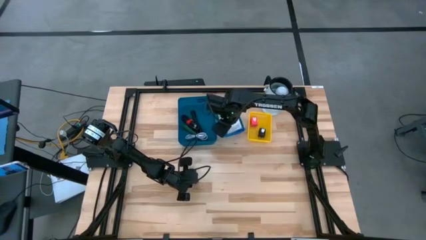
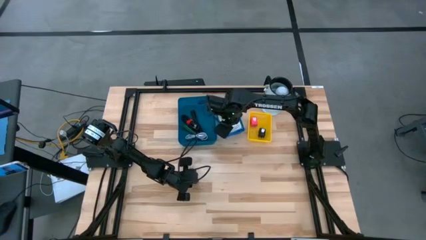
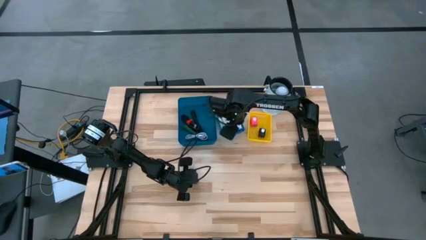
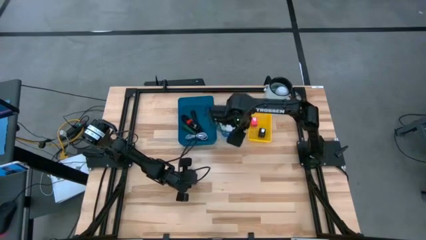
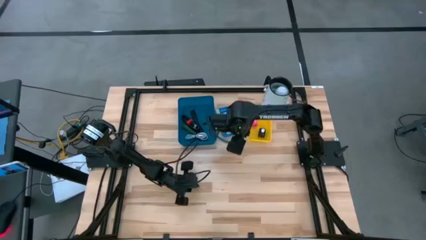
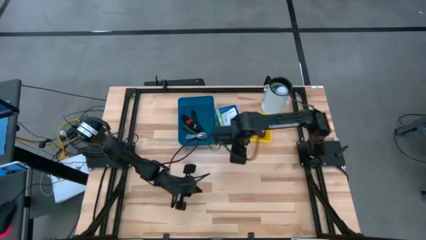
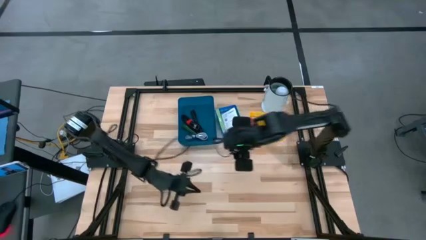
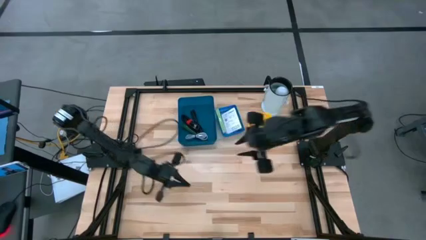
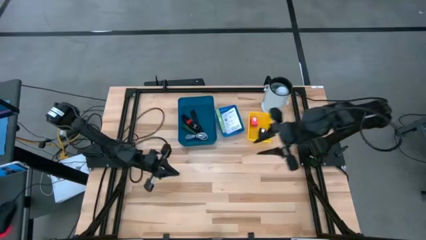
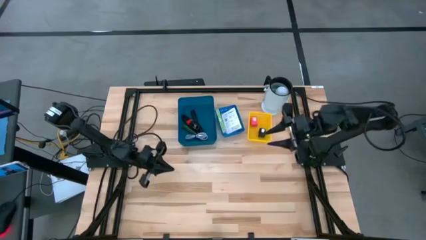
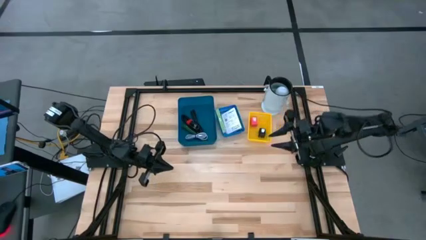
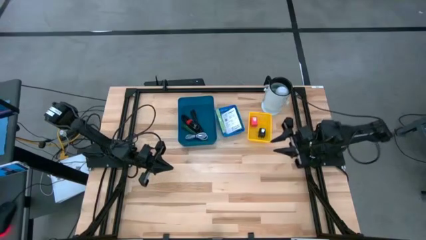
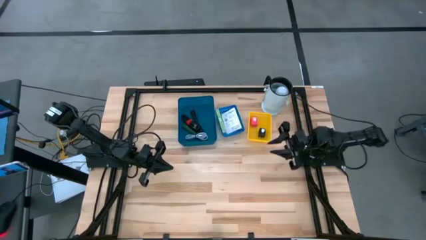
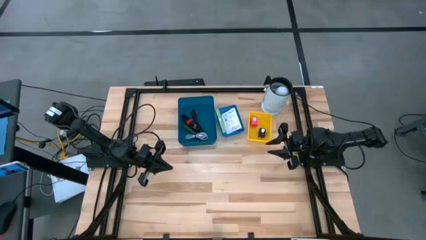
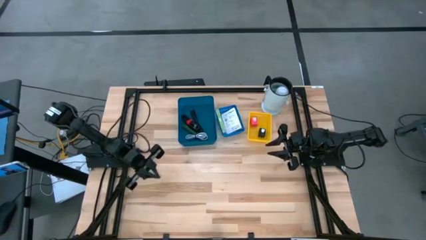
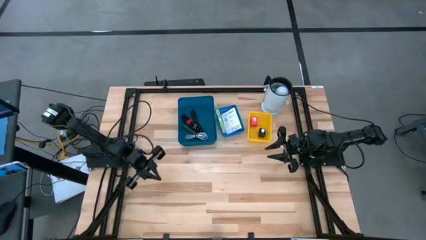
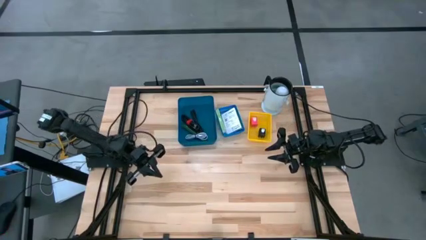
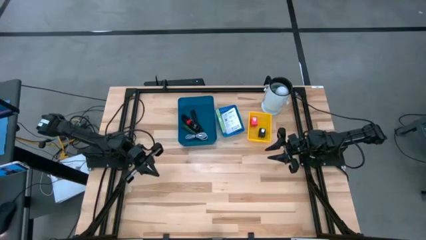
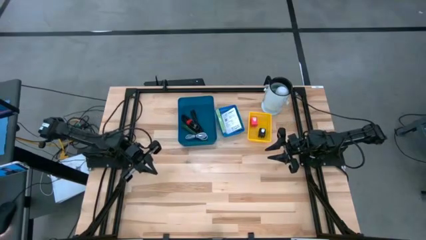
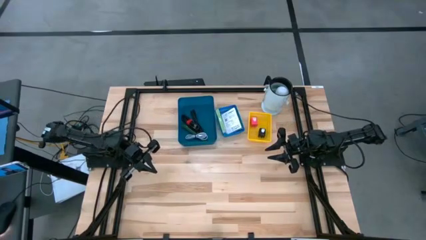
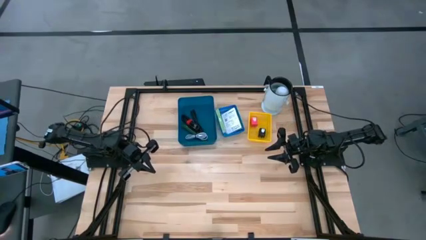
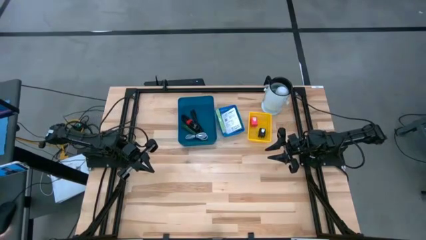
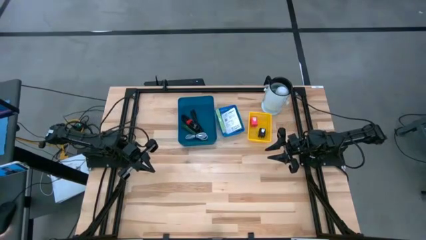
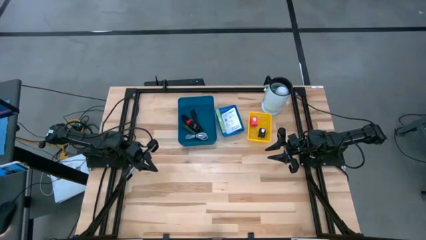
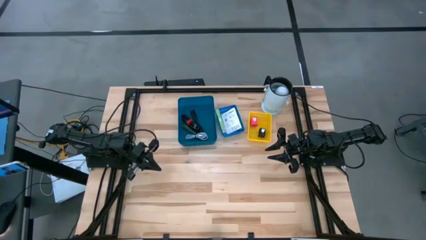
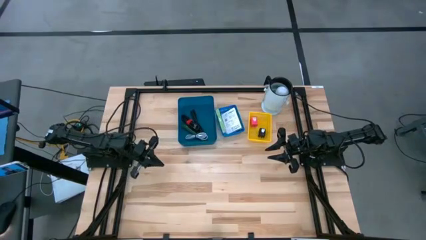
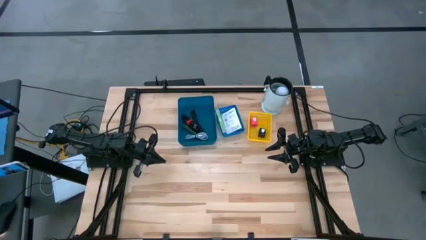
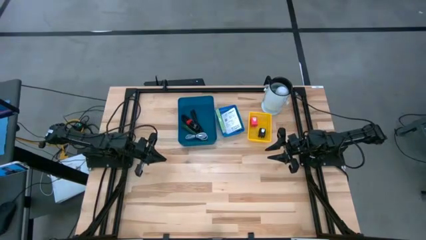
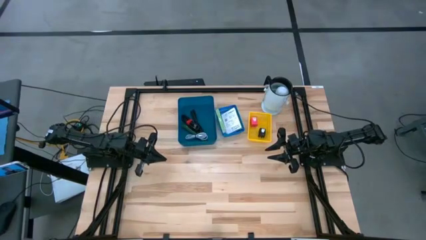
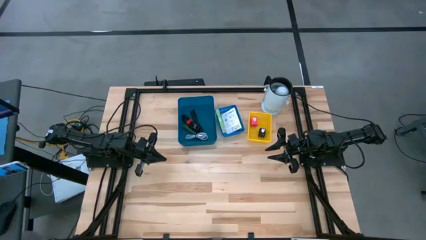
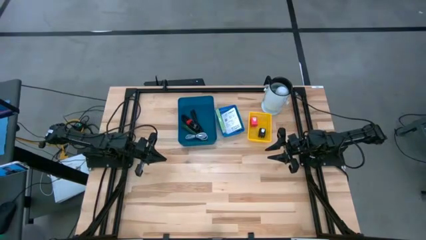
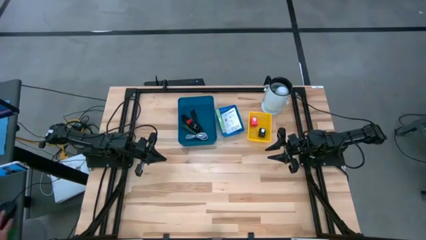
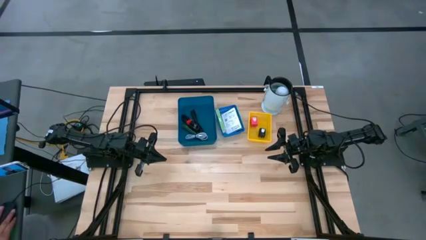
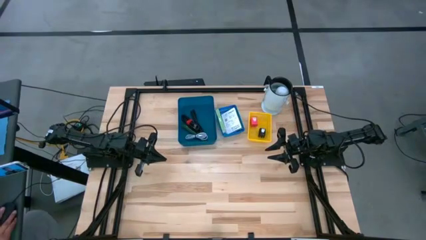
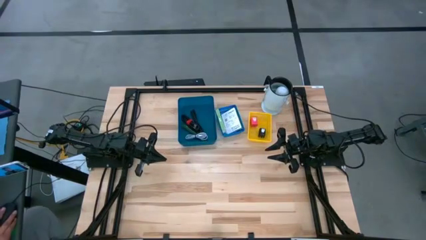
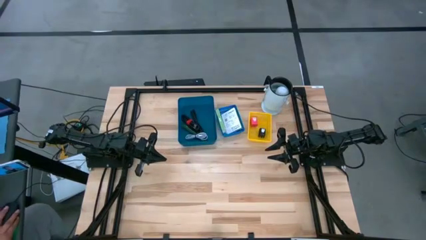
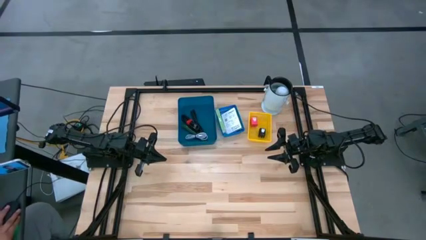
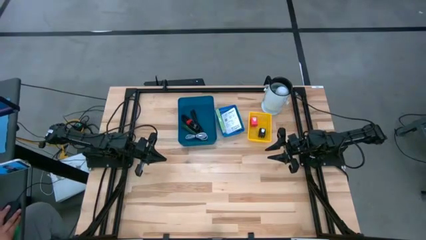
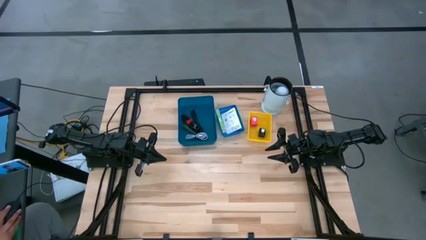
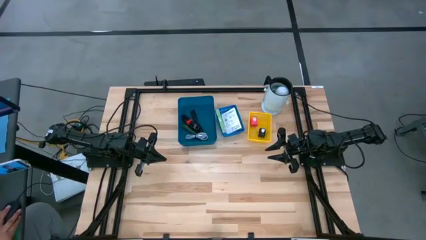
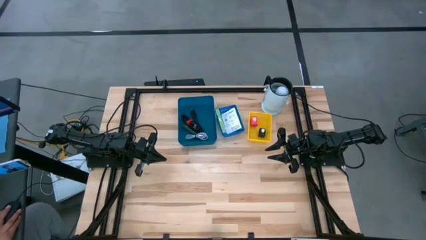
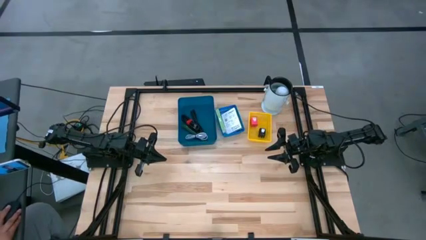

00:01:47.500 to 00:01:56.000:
Task: Pick and place items into bin
Return to Home Position

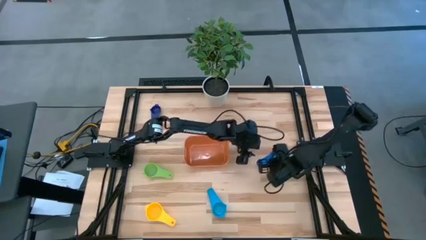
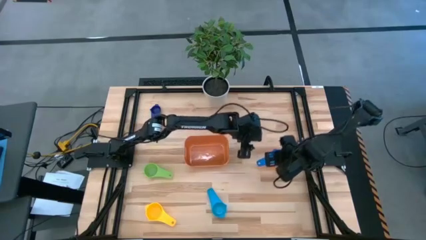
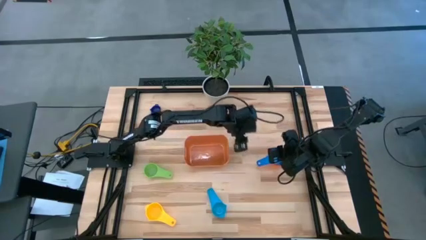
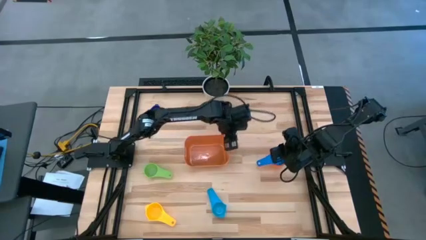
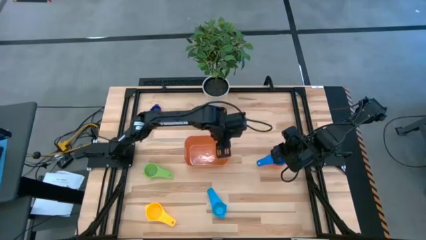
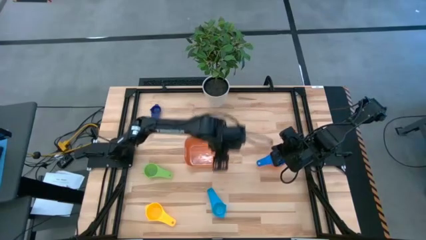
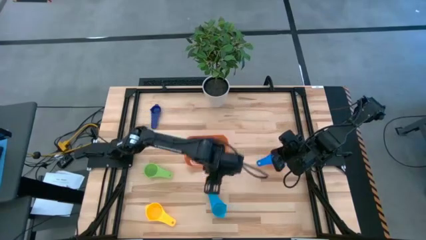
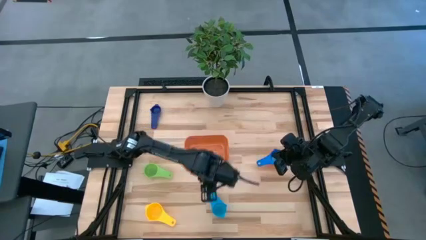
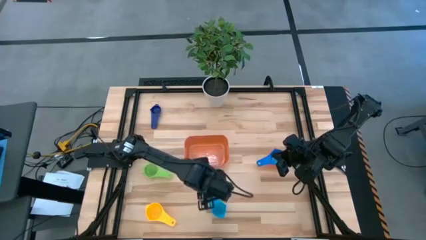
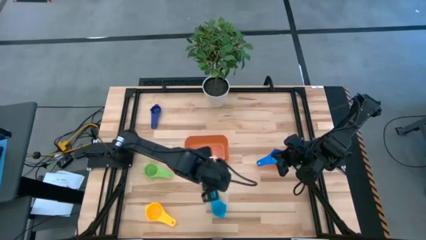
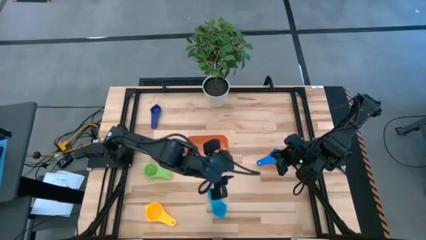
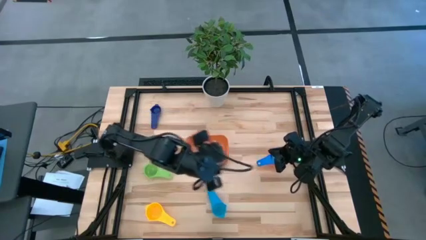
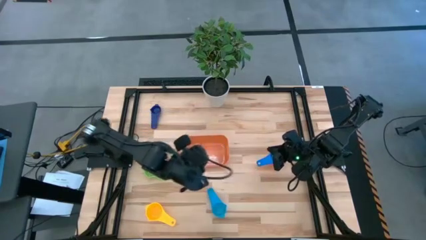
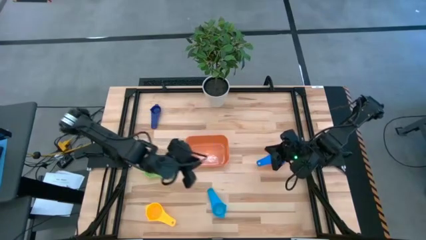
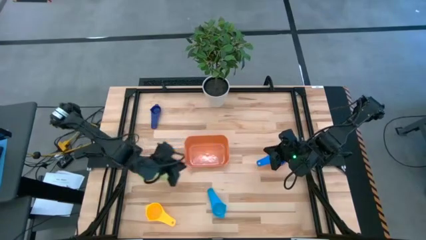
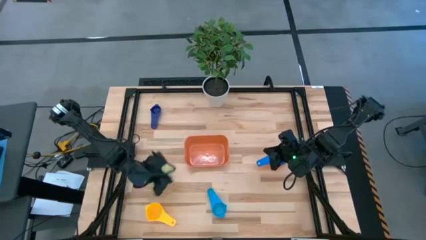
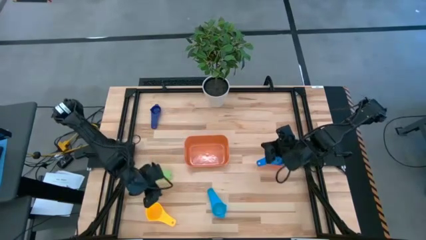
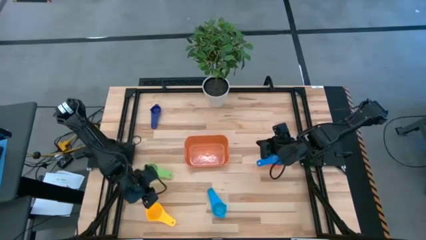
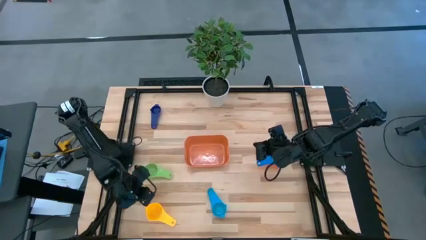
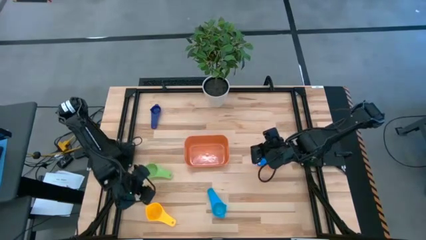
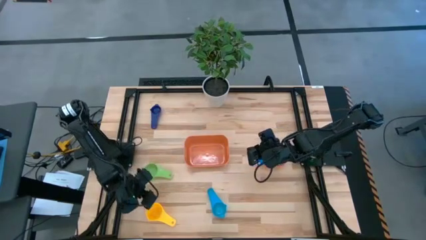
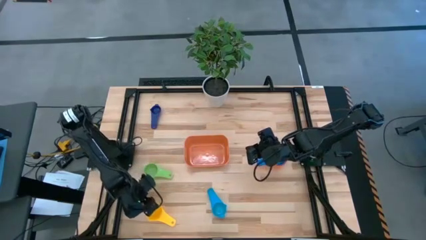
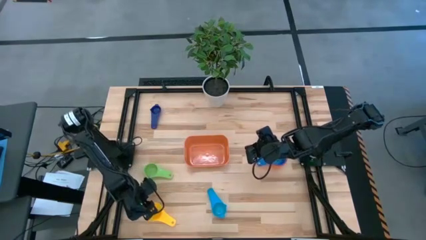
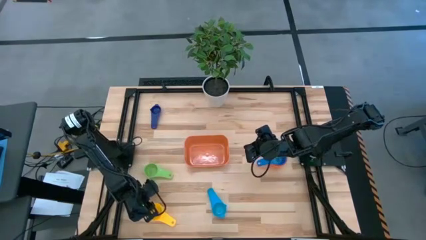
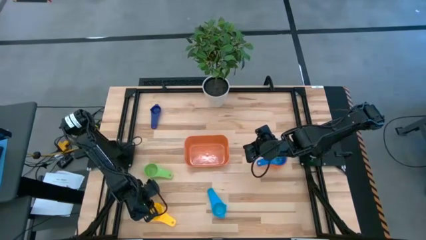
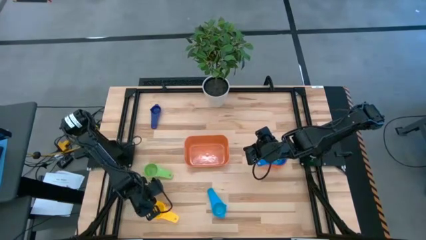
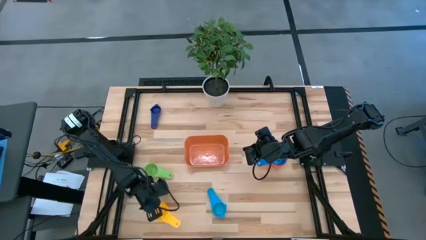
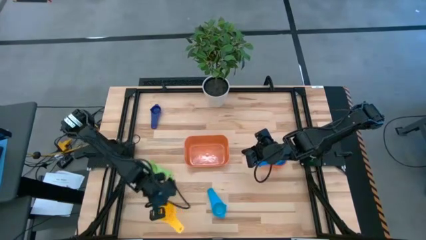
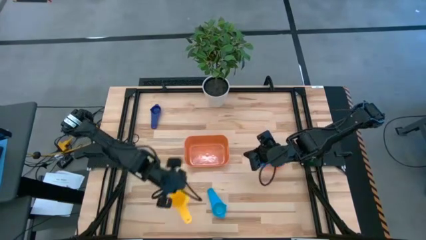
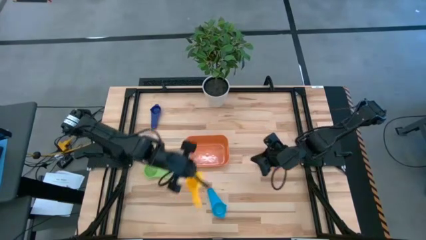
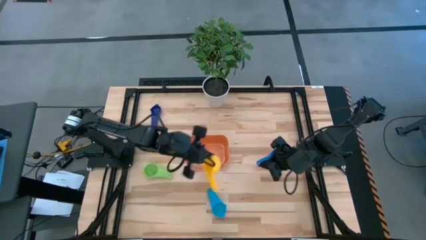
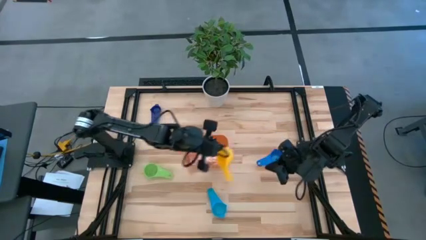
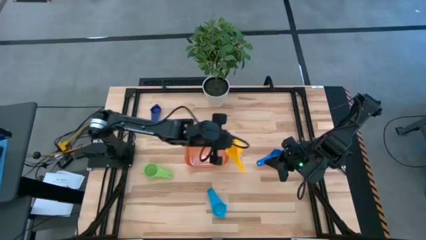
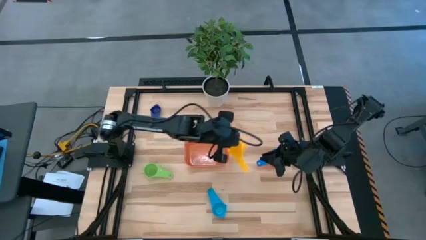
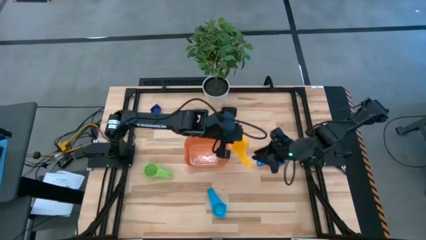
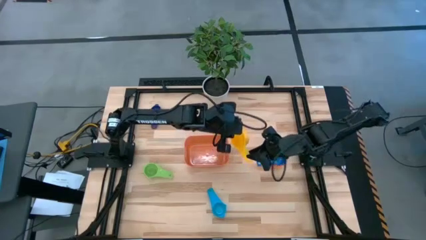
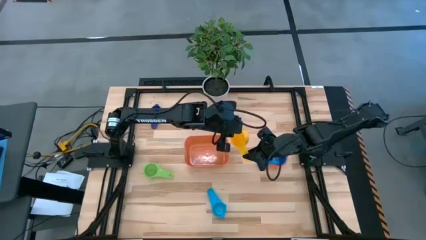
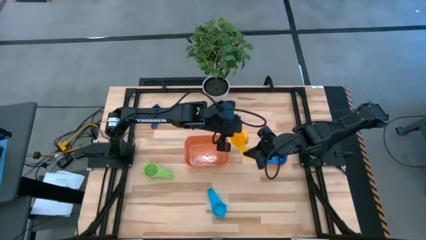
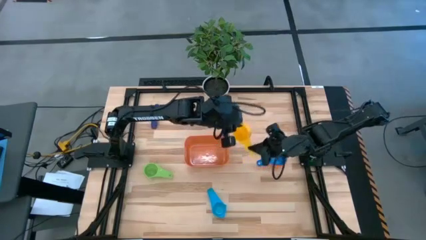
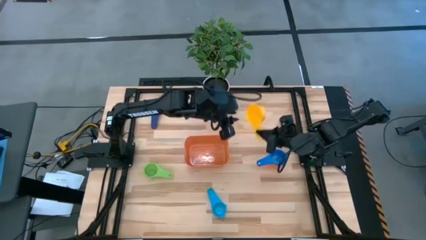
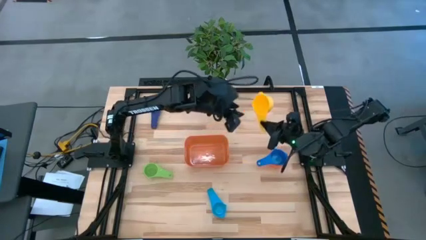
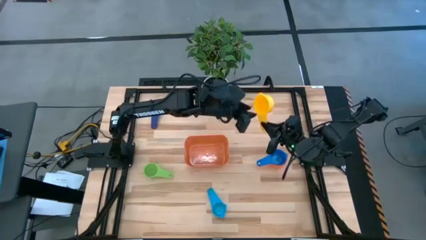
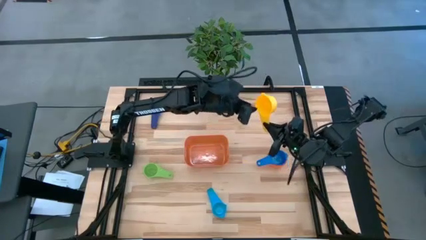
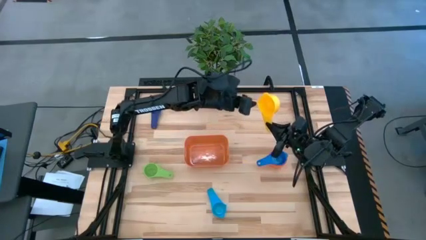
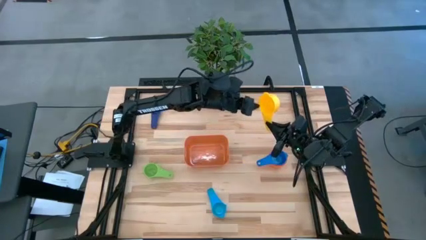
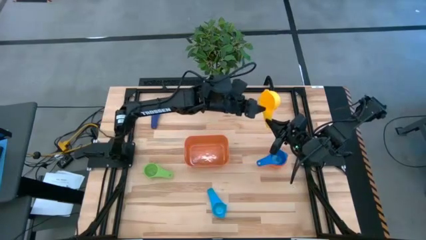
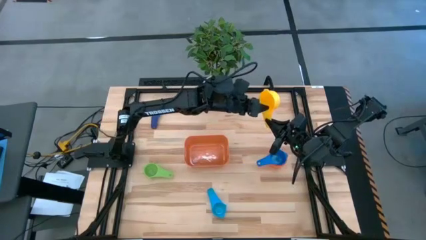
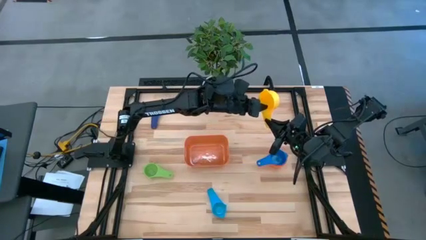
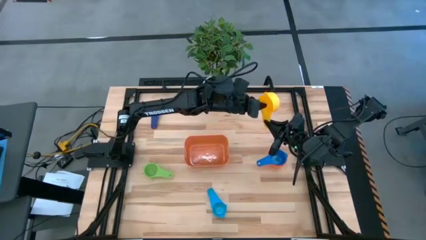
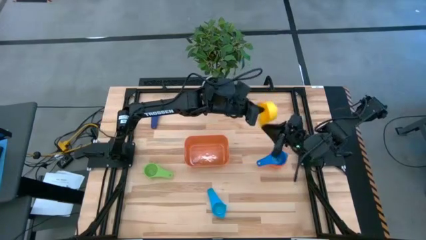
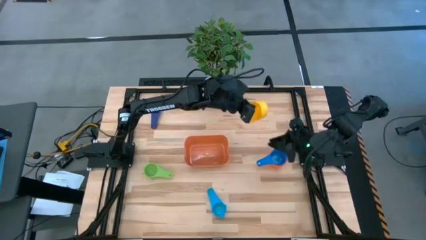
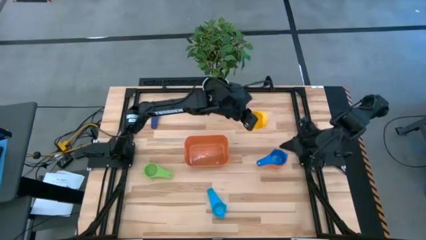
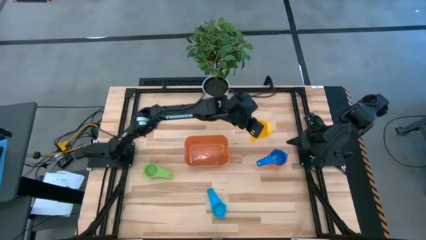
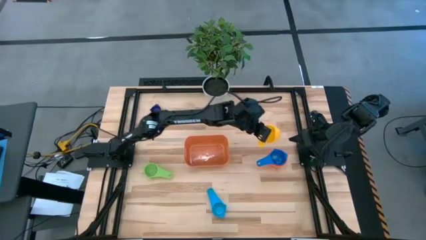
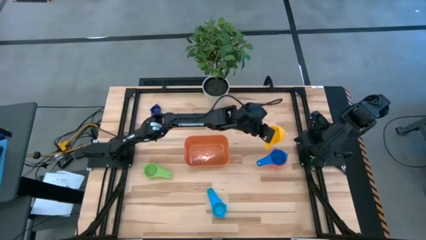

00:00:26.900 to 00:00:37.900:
Task: Nest measuring cups in basket
Stack the yellow measuring cup on top of the blue measuring cup
